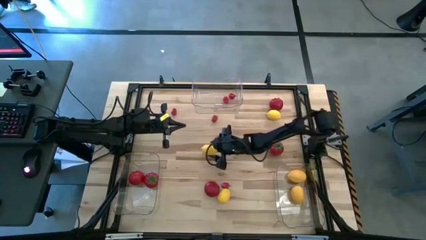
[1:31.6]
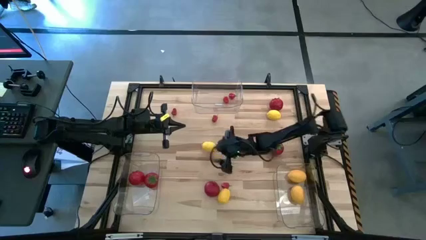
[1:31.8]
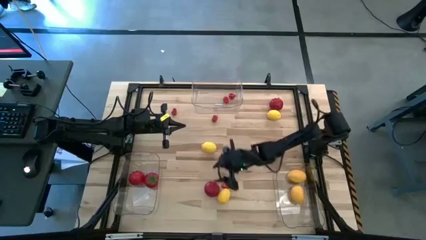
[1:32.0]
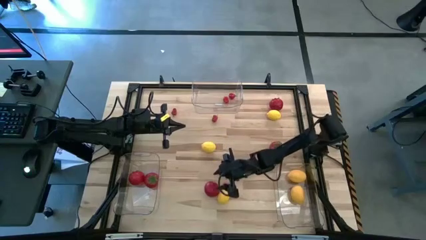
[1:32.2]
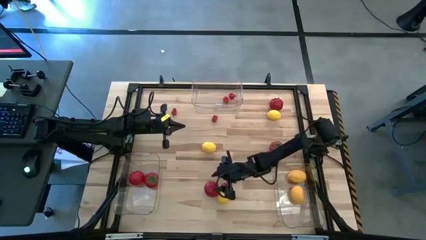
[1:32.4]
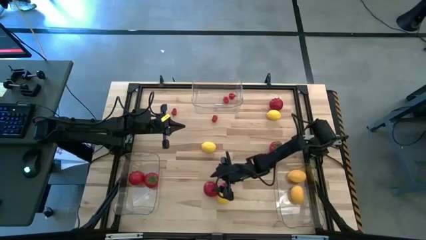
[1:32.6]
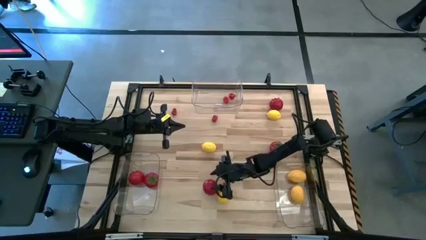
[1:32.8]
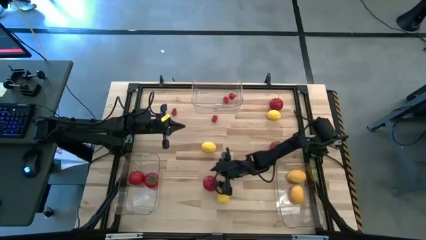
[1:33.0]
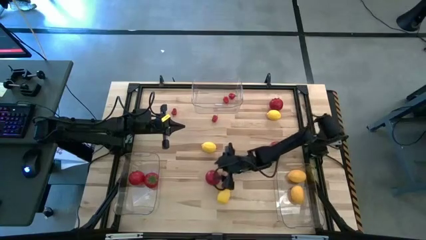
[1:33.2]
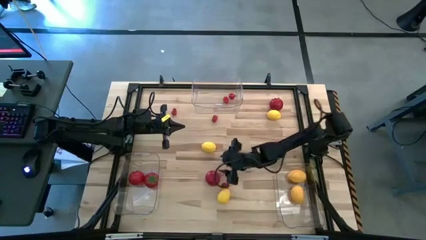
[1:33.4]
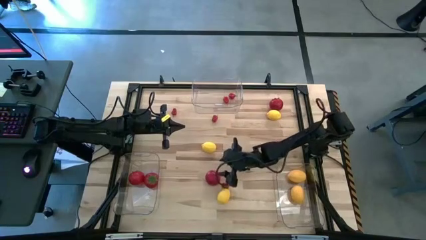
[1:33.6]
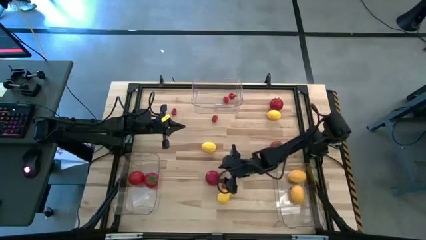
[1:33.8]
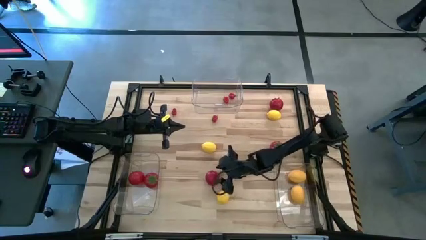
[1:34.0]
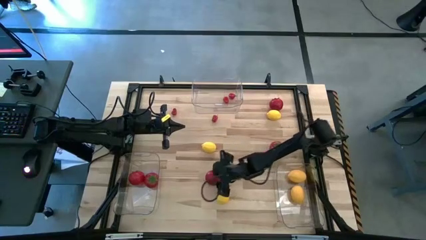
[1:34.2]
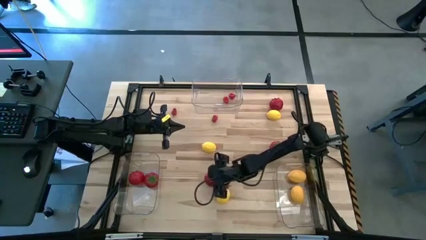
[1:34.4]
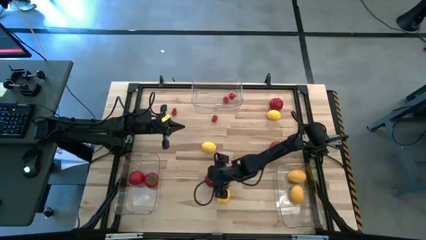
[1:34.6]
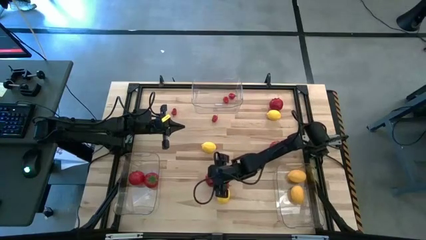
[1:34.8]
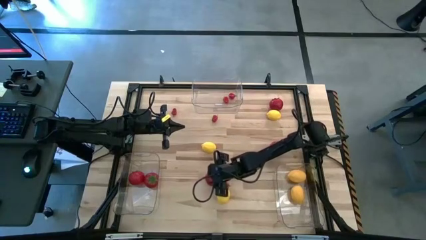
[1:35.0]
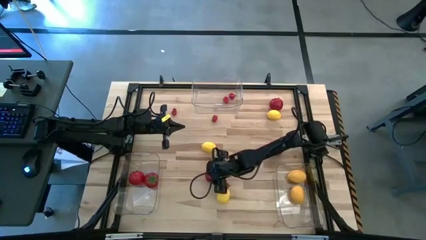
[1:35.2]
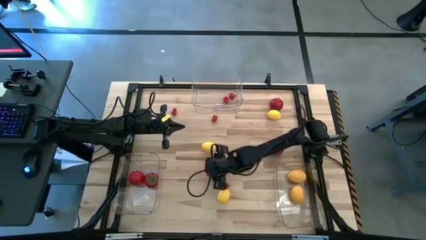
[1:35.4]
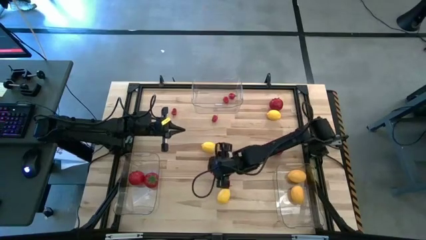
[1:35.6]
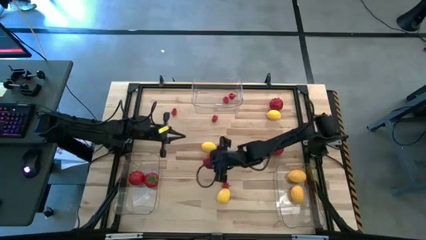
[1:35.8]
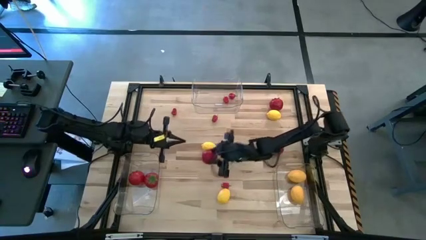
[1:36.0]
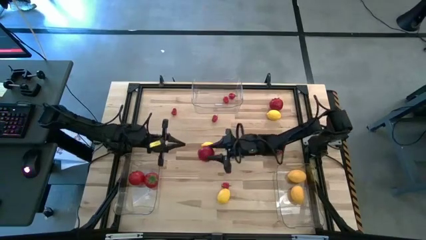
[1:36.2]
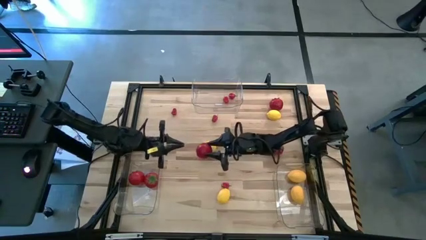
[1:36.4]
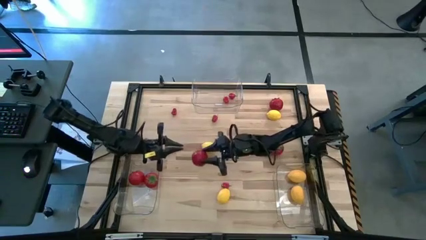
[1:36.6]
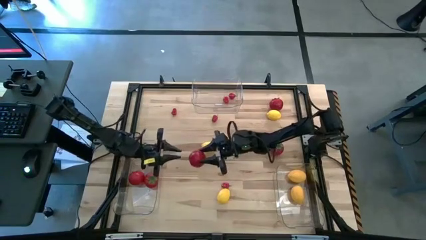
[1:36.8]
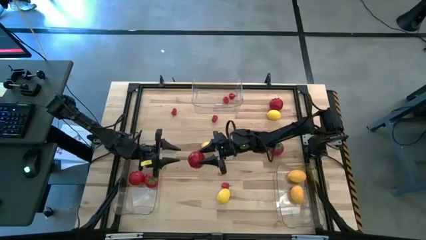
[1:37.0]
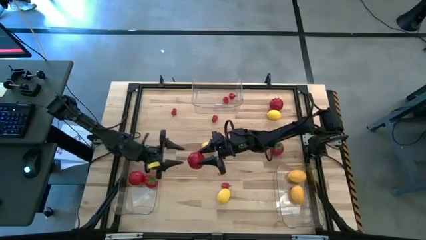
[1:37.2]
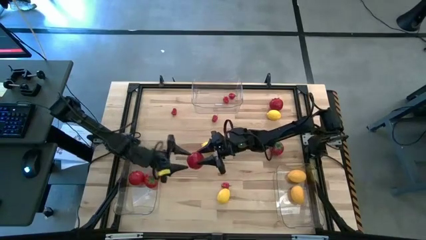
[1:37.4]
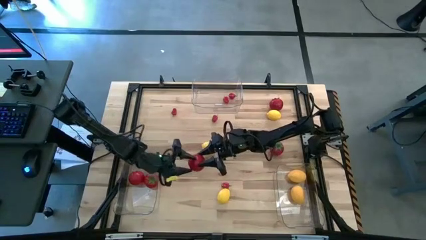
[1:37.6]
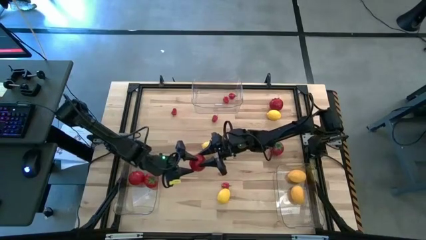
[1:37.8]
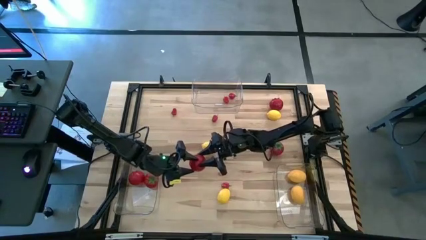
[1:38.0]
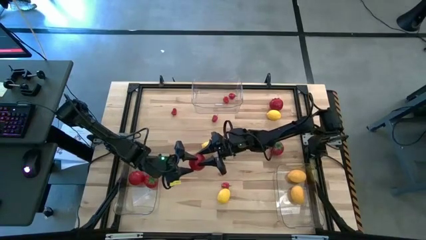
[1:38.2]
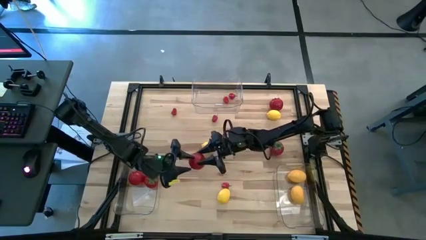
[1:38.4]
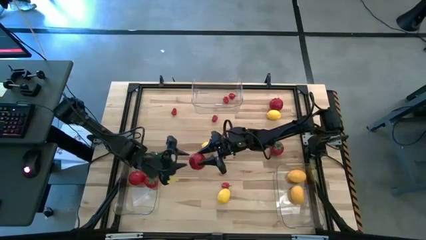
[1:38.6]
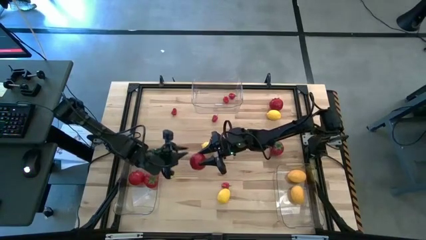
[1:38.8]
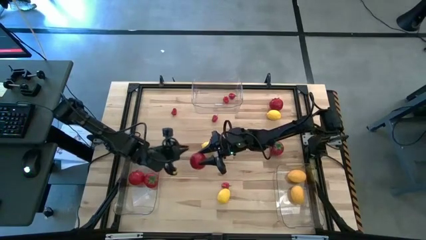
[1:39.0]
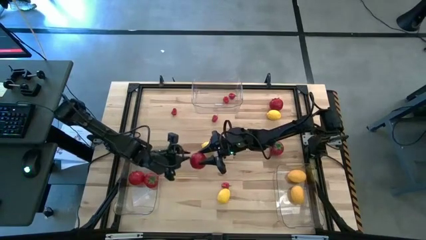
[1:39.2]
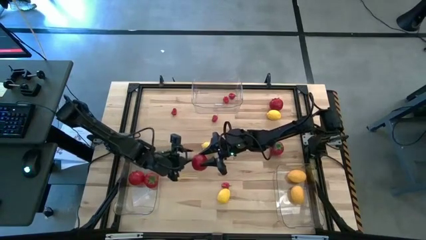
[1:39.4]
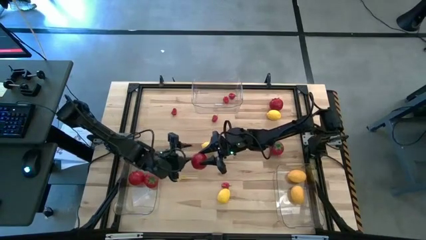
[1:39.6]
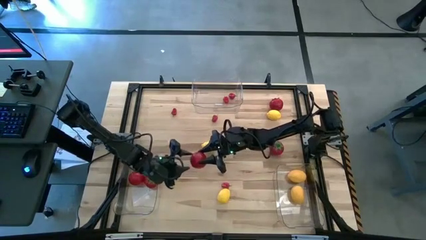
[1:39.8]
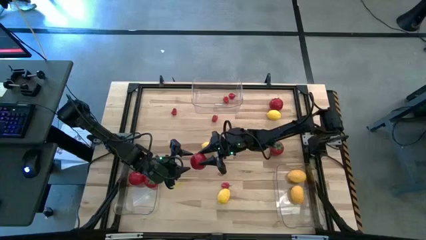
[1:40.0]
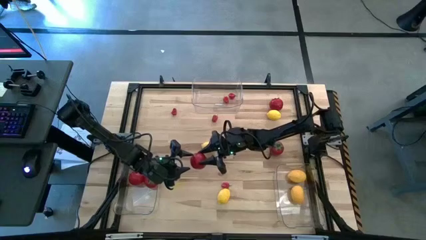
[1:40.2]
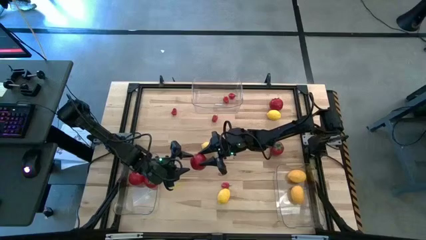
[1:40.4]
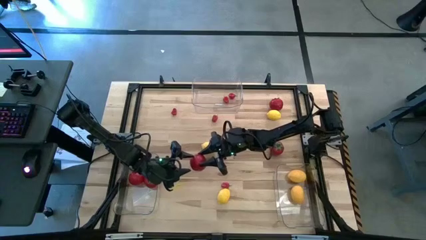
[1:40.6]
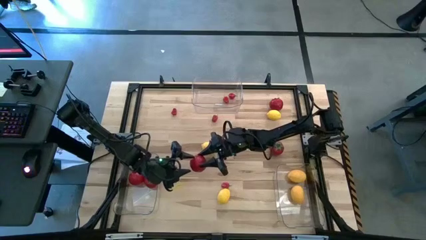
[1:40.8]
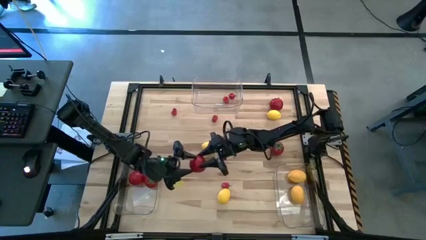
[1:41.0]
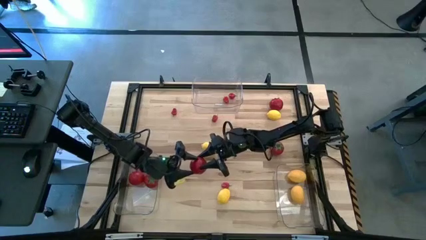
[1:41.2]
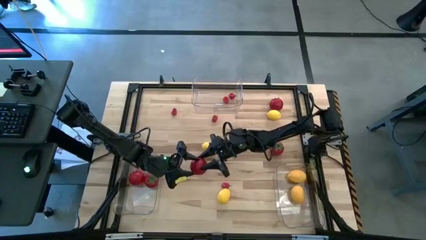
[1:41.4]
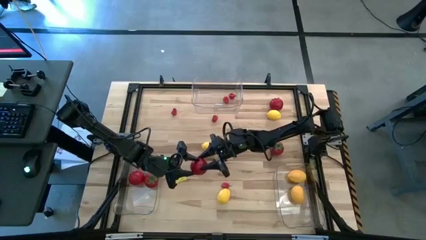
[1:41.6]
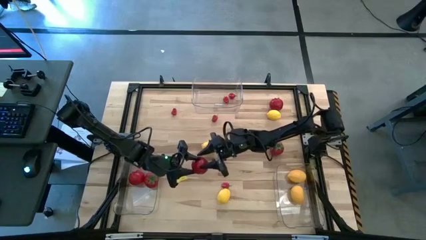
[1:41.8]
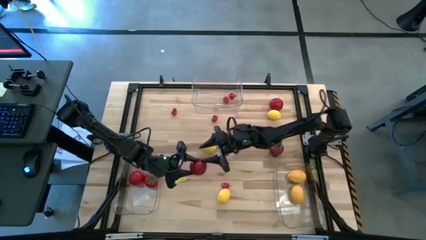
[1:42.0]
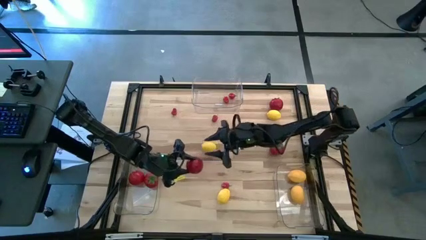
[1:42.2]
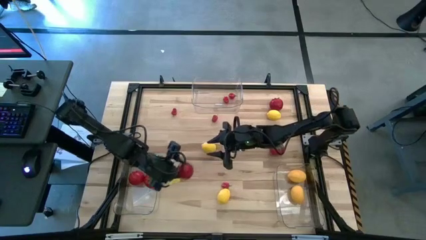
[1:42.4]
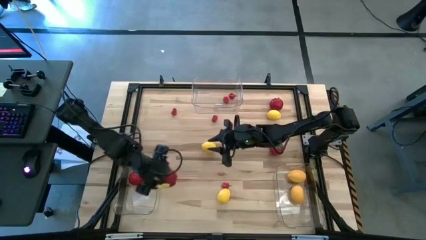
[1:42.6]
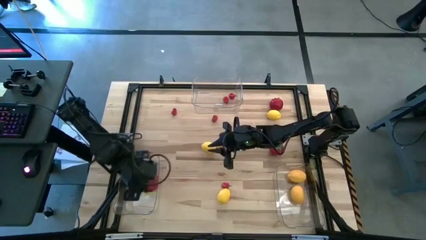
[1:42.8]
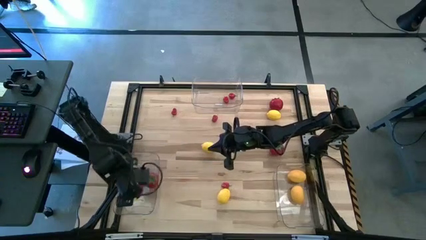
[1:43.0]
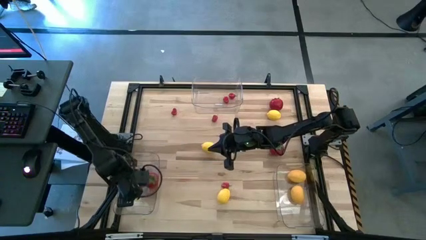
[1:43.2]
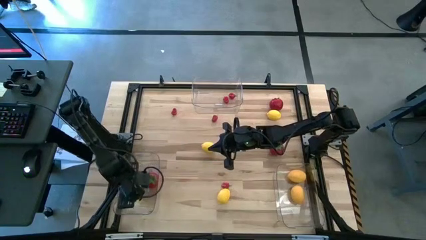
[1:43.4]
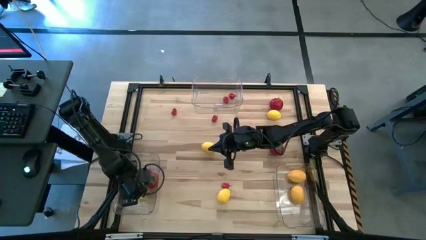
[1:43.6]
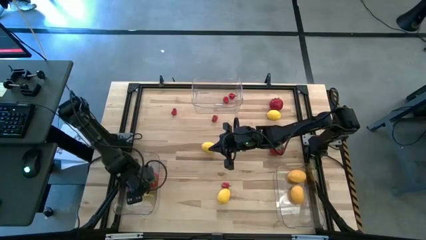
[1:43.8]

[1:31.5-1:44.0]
Task: Sort produce into baskets
Put the red tomato into the bottom left transparent bin

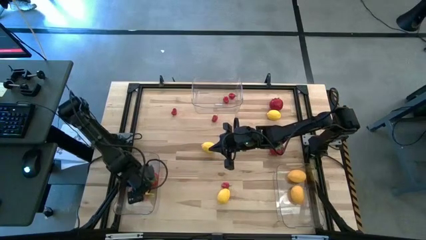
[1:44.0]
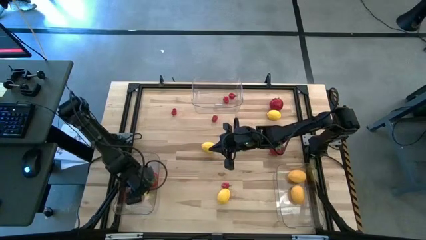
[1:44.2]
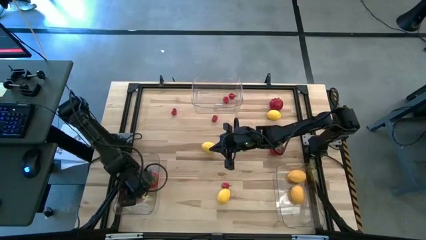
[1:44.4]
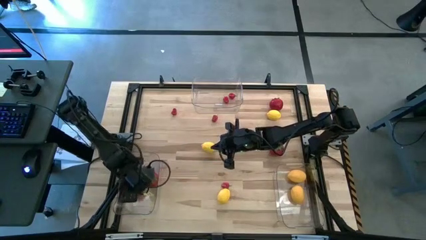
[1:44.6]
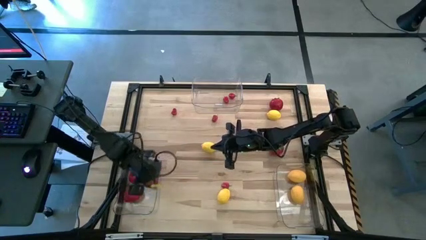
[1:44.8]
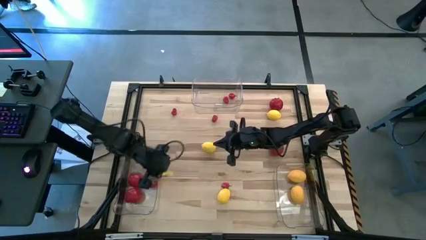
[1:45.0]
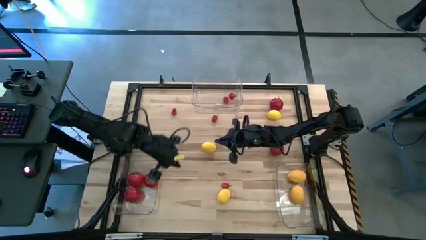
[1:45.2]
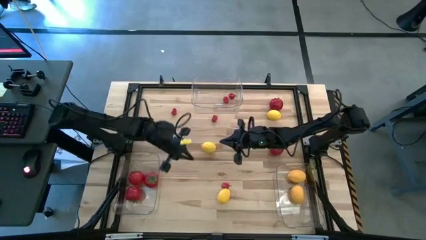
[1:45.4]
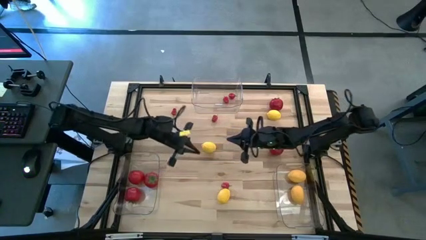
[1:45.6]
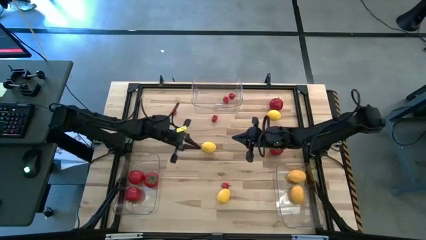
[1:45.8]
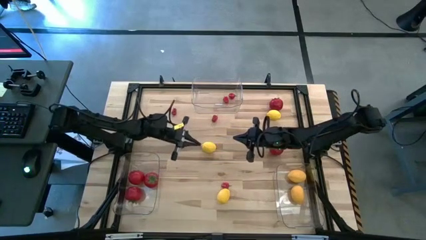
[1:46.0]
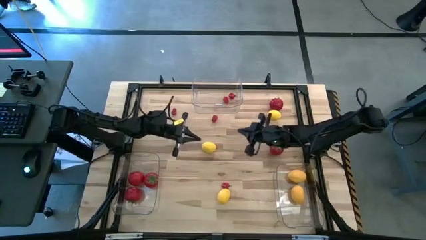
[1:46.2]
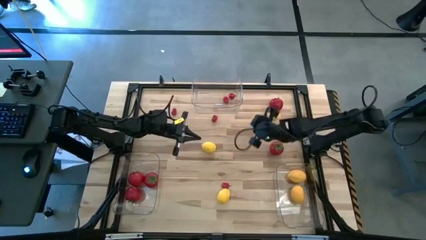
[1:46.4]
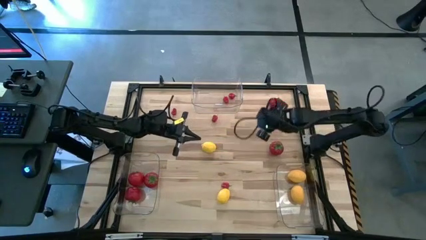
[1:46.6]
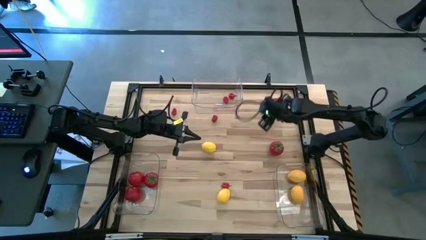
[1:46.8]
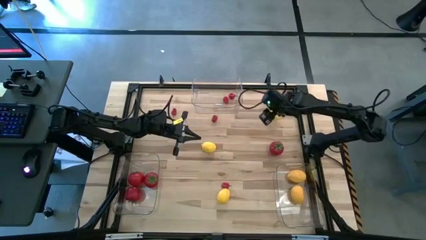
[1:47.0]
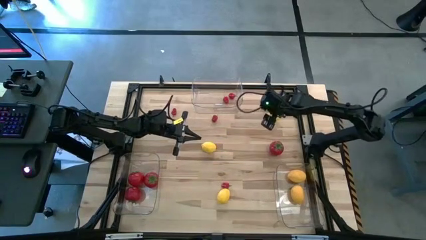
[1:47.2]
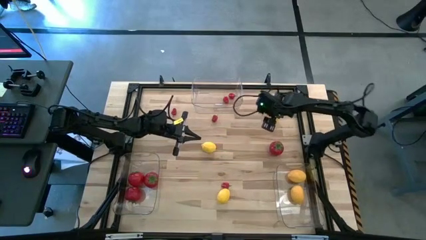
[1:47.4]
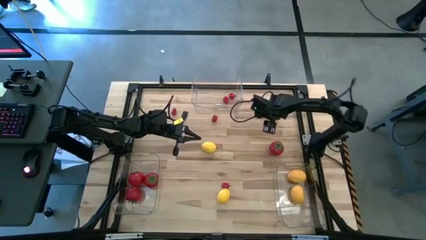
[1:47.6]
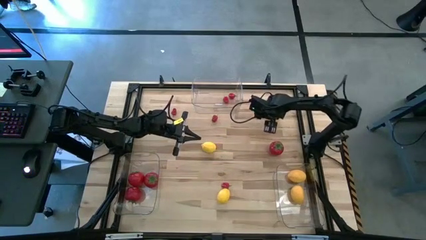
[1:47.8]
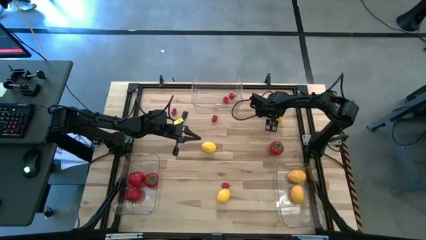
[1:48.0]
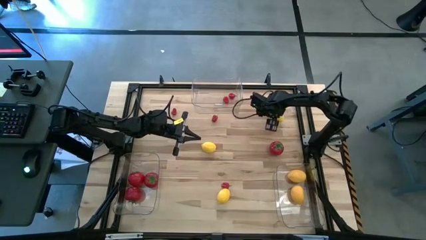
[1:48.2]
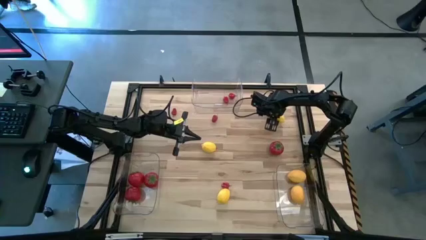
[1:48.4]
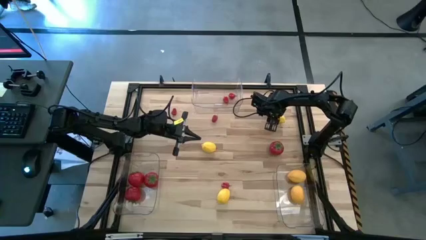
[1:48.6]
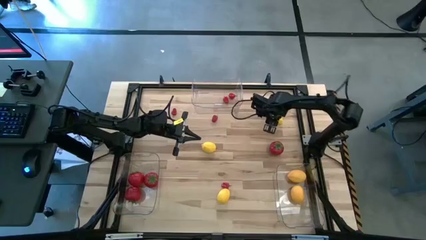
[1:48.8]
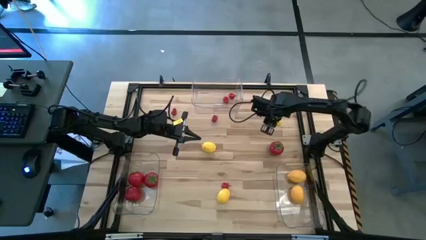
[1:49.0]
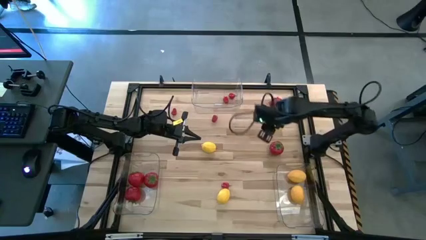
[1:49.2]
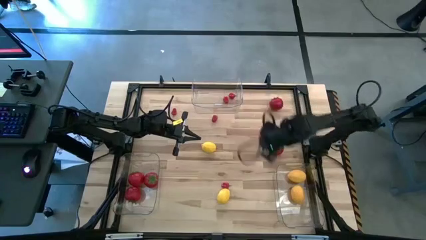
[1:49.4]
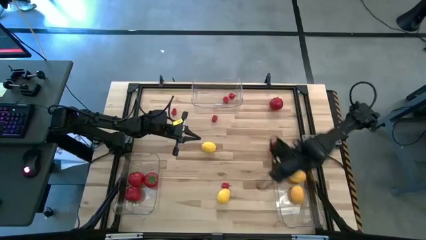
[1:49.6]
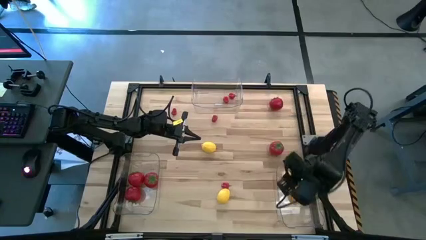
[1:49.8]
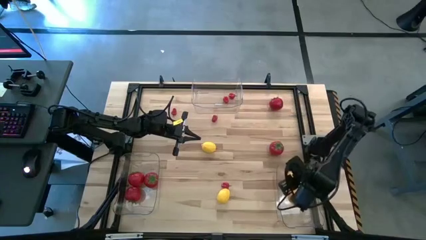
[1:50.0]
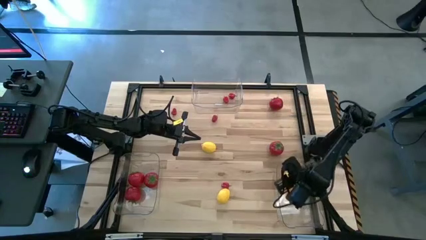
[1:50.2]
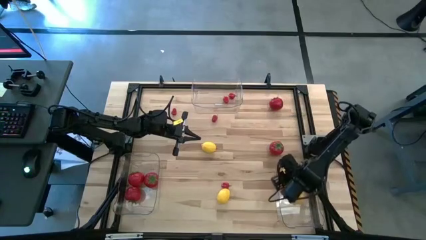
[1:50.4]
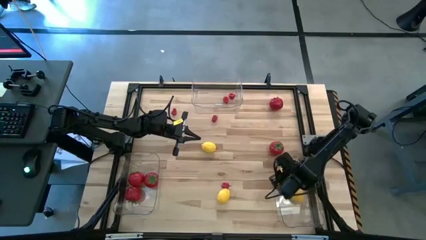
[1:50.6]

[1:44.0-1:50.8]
Put the yellow lemon into the bottom right transparent bin
